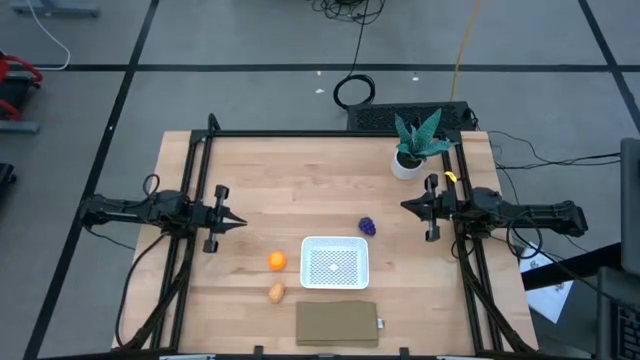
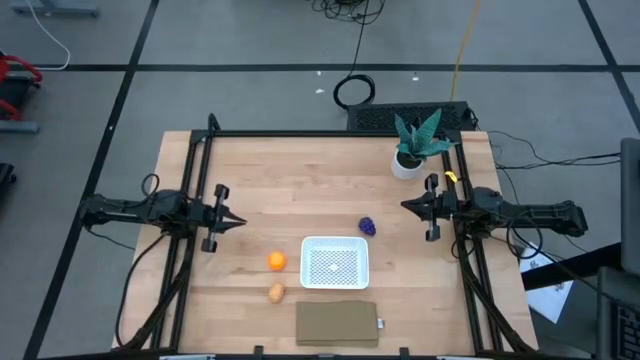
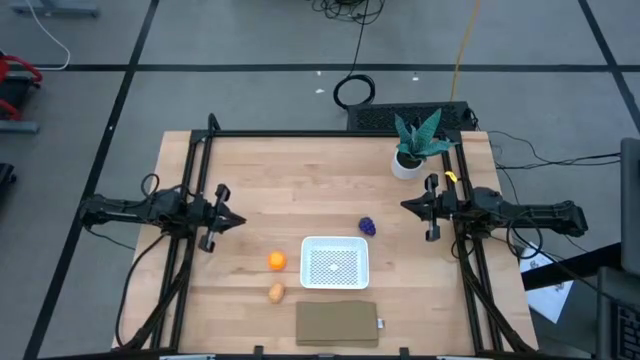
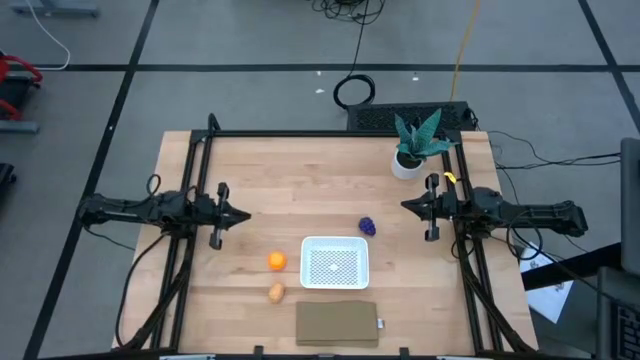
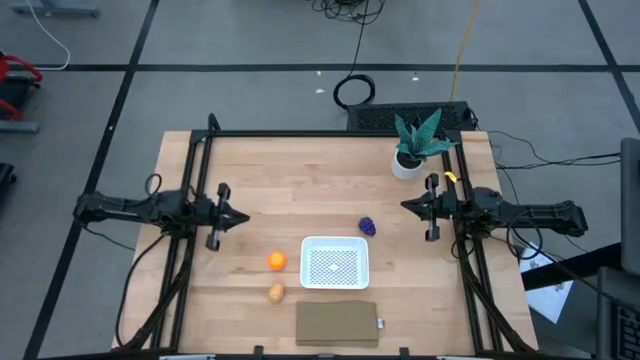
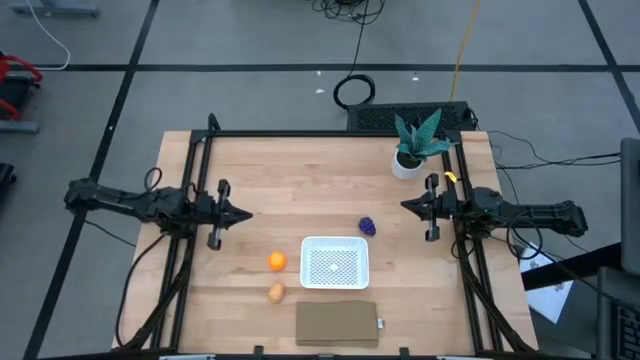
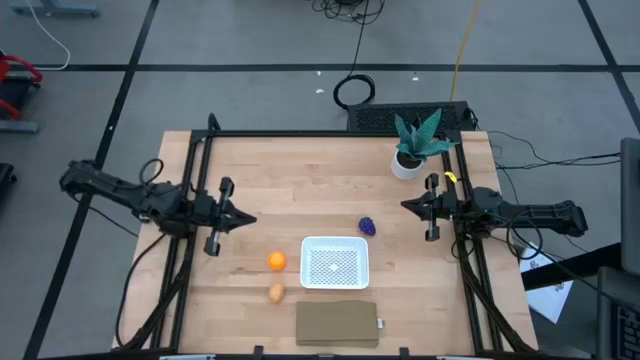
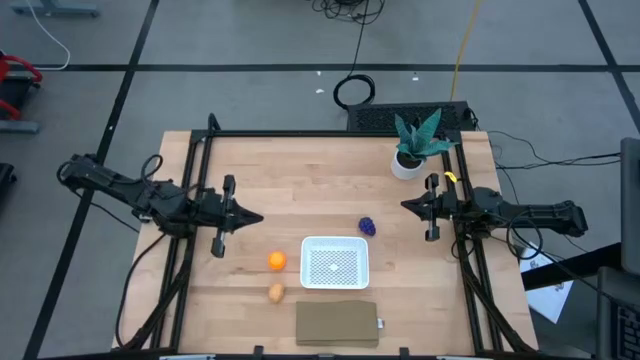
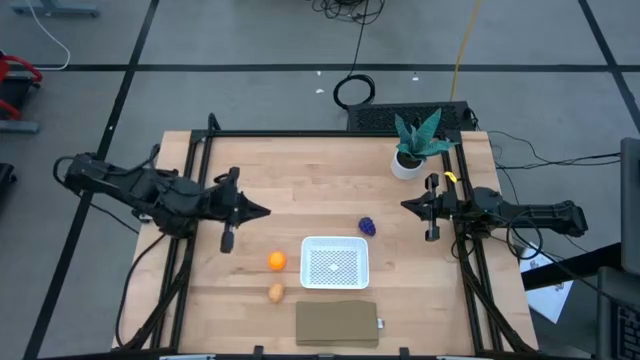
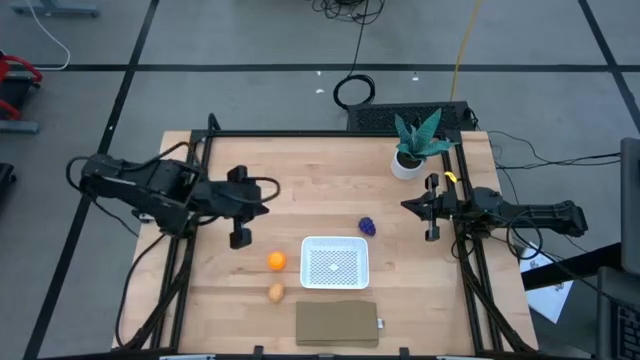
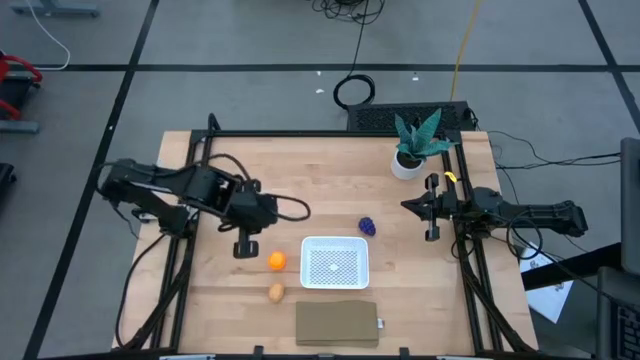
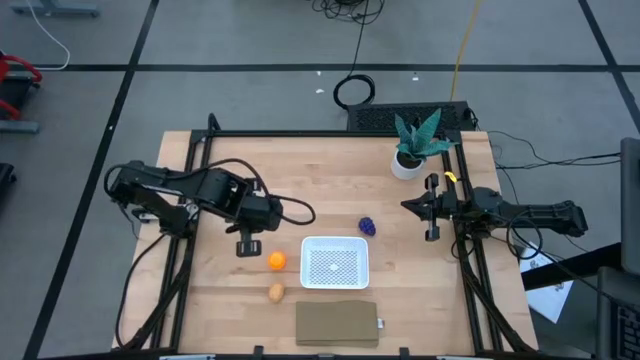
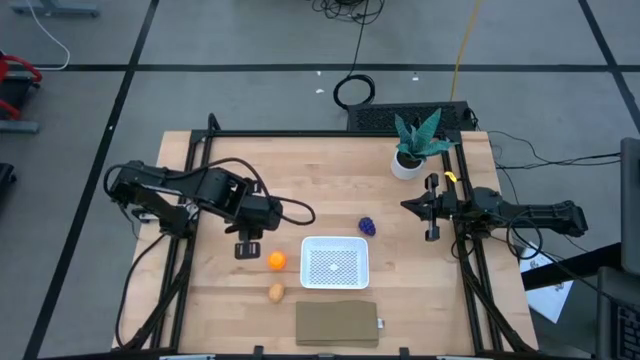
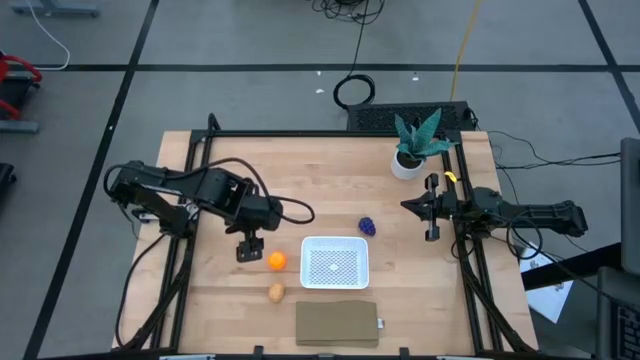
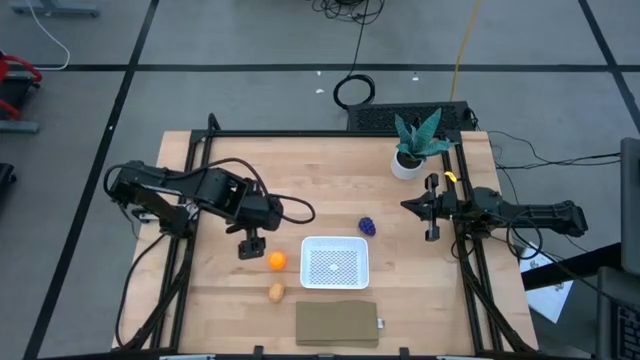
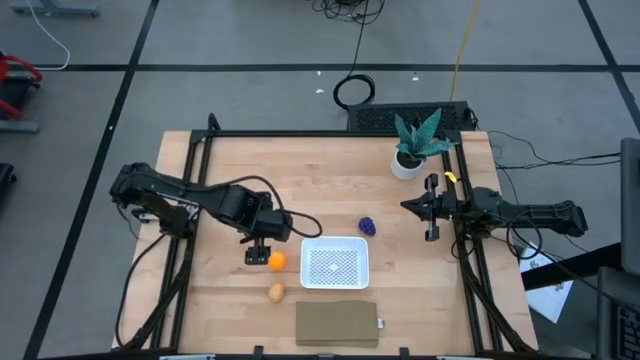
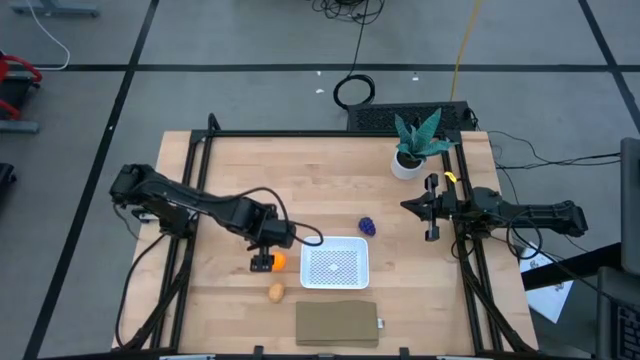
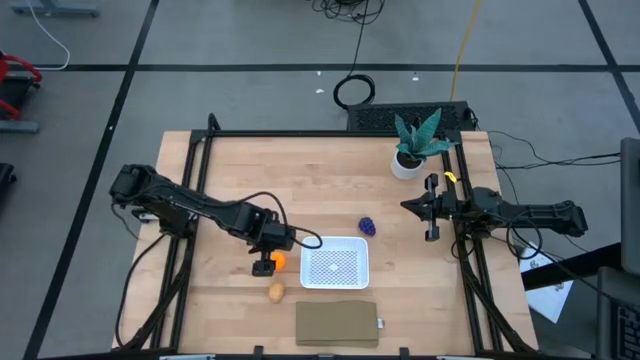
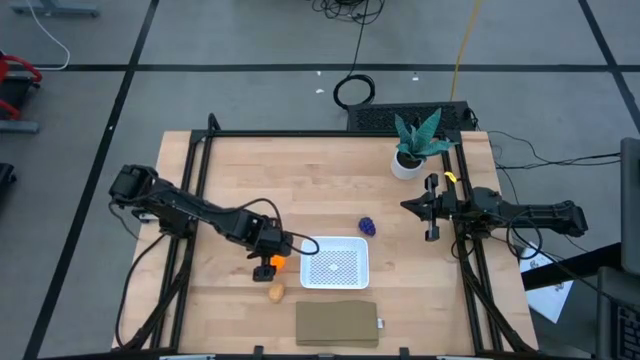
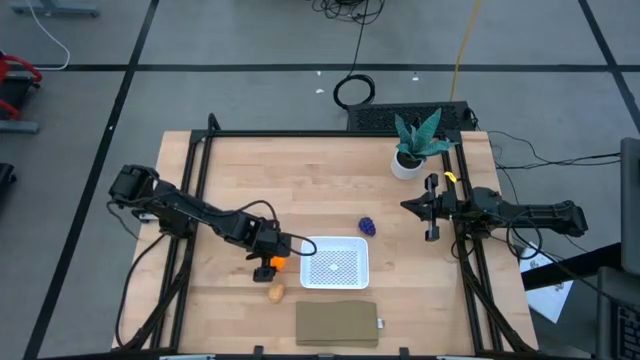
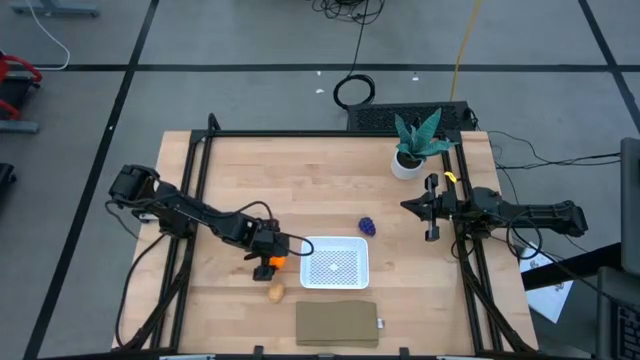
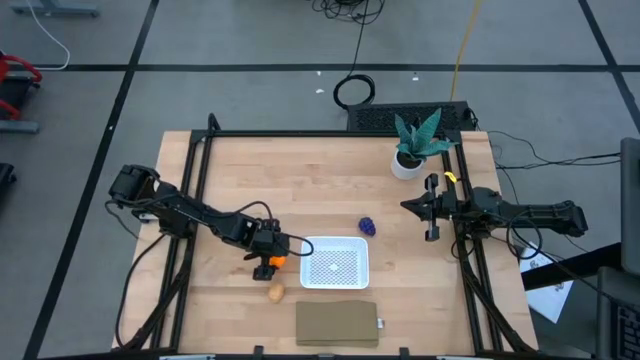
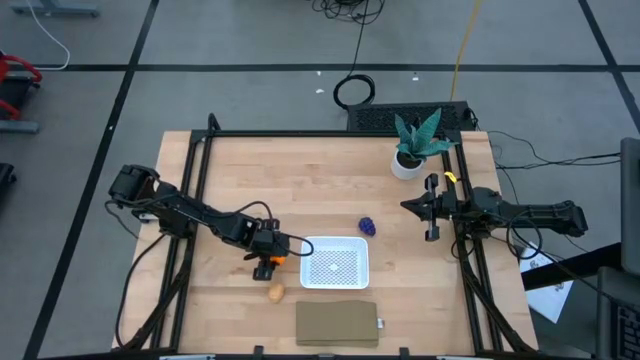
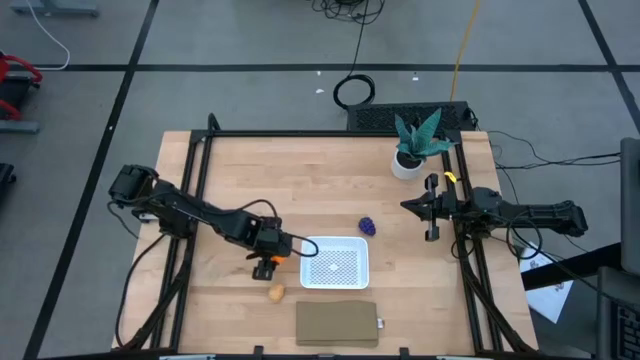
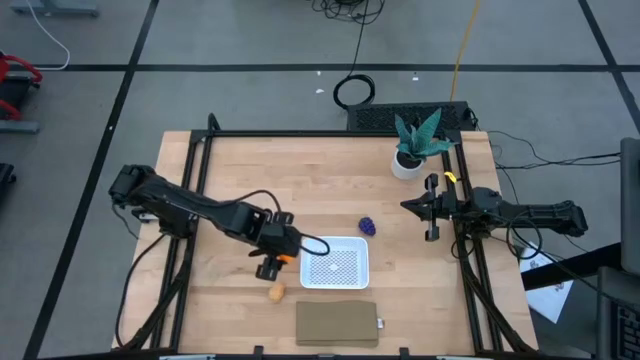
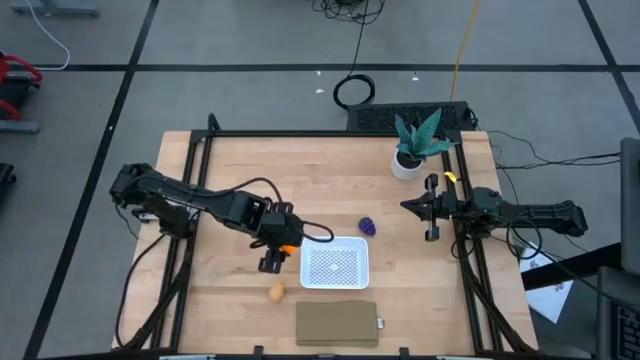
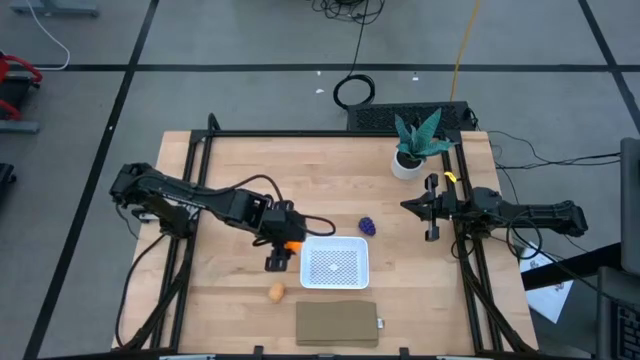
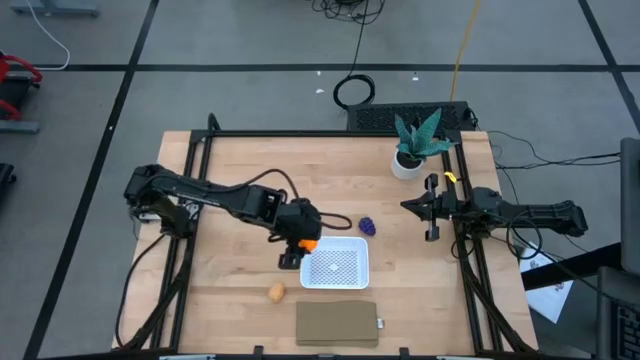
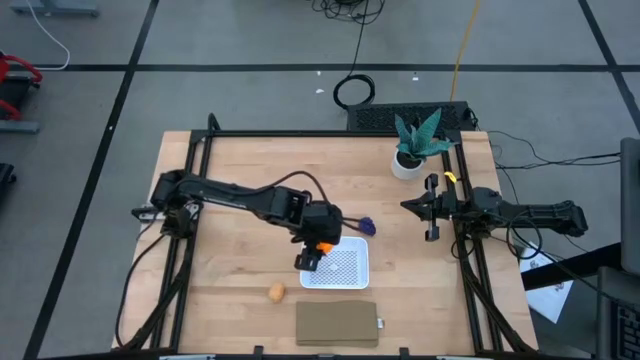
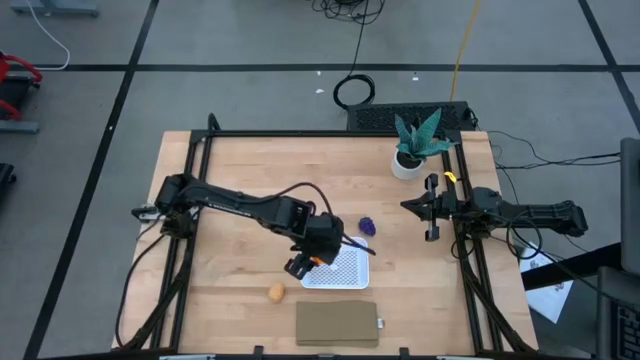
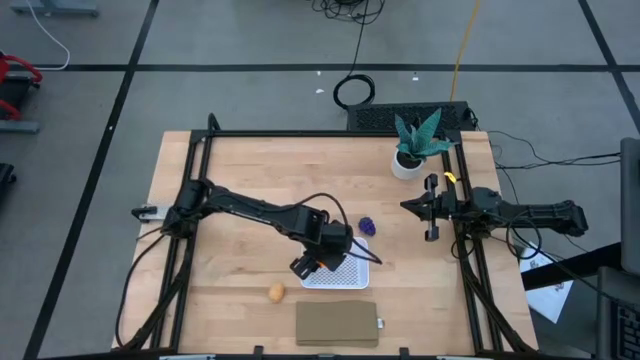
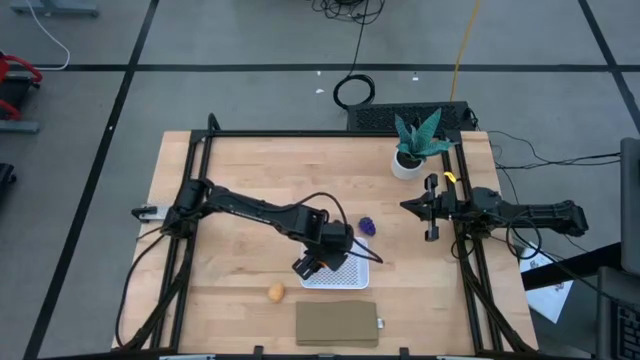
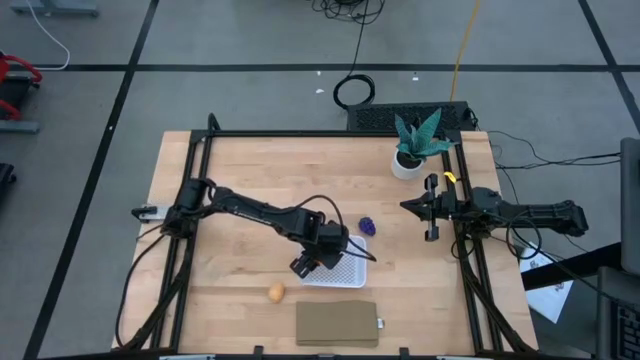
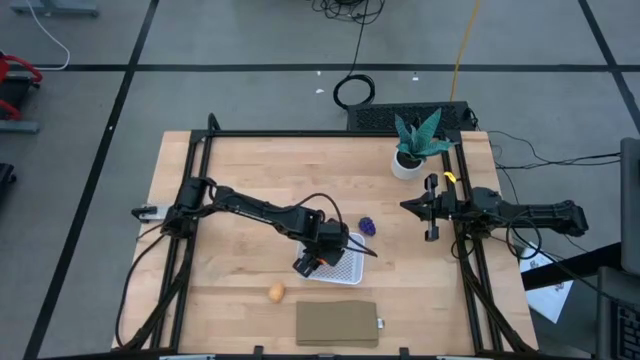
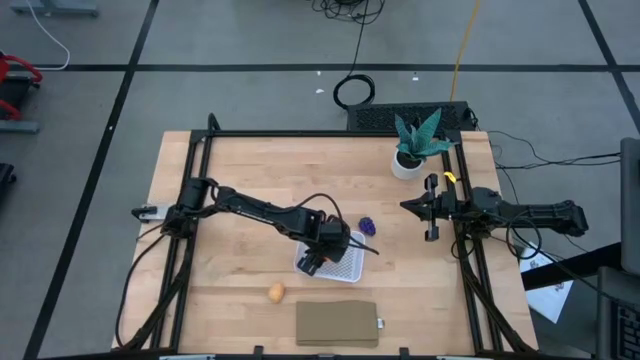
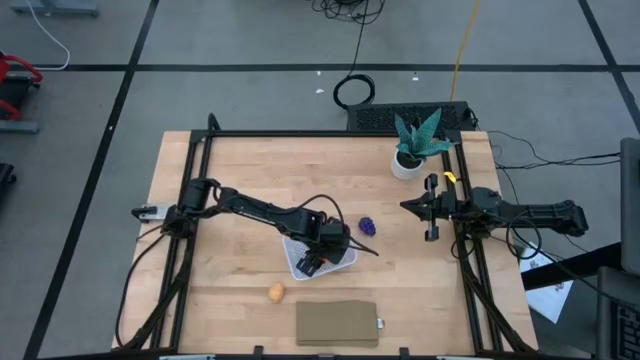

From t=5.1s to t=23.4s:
Task: Pick and placing Produce into tupperware
Put the orange into the basket

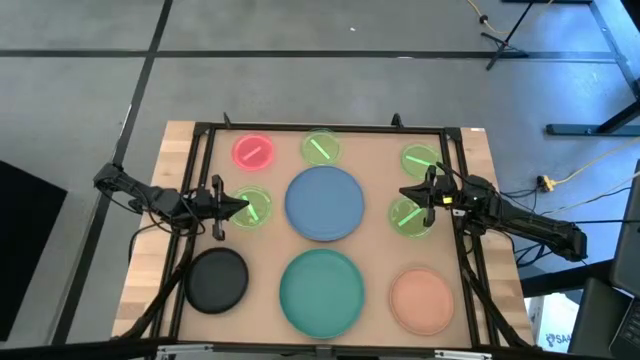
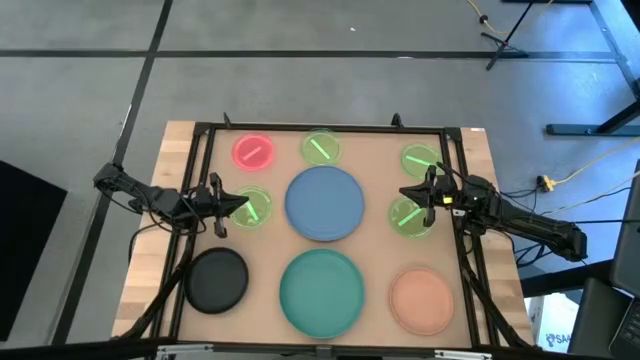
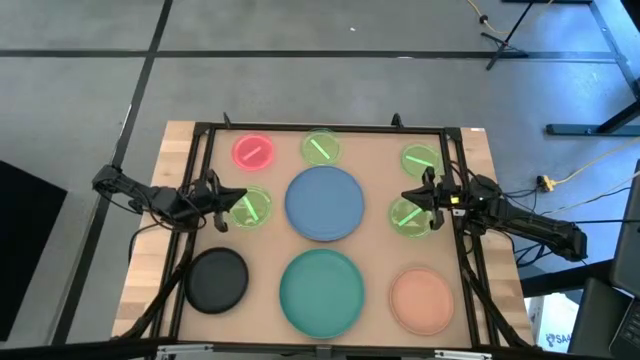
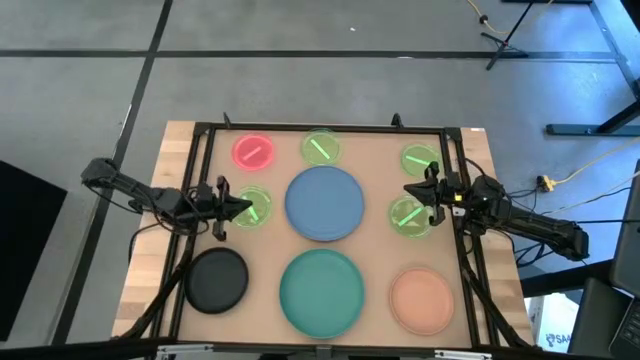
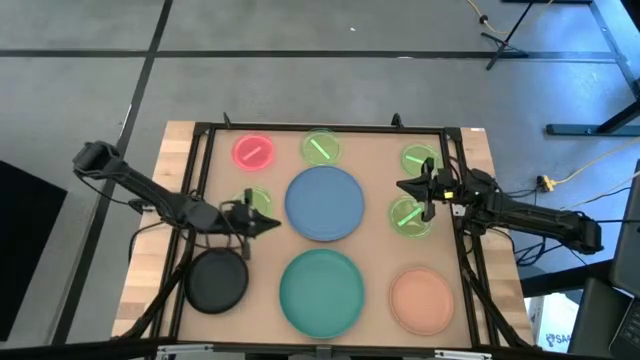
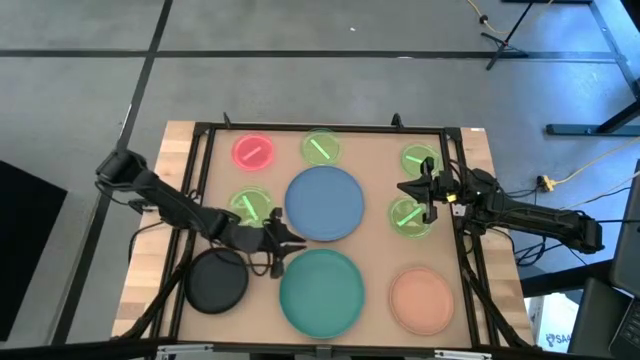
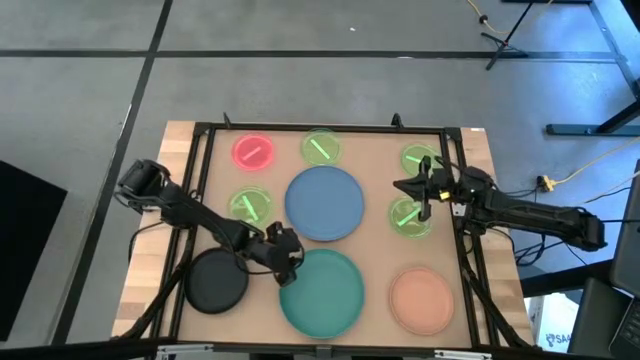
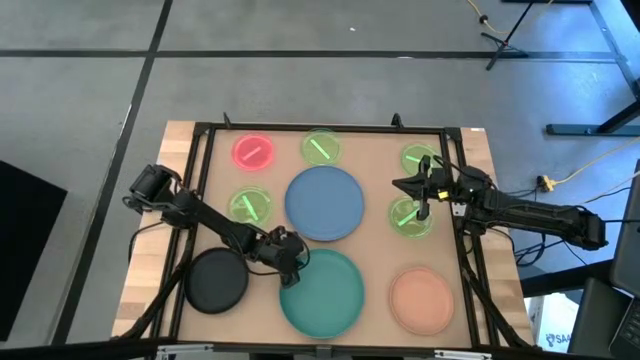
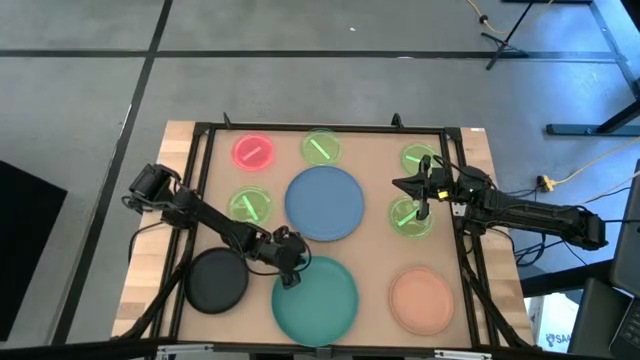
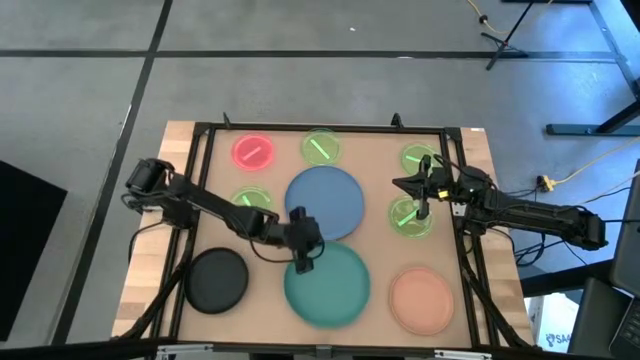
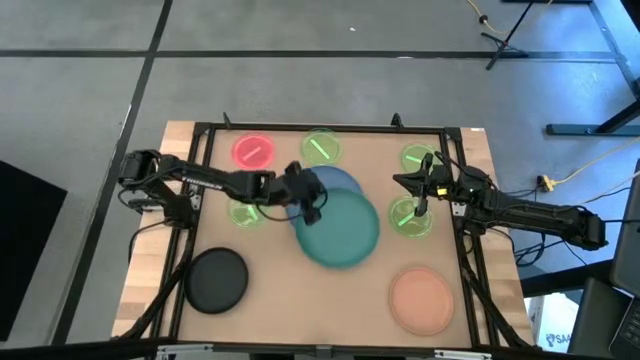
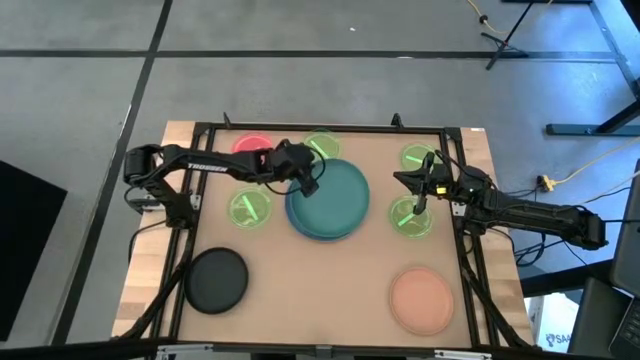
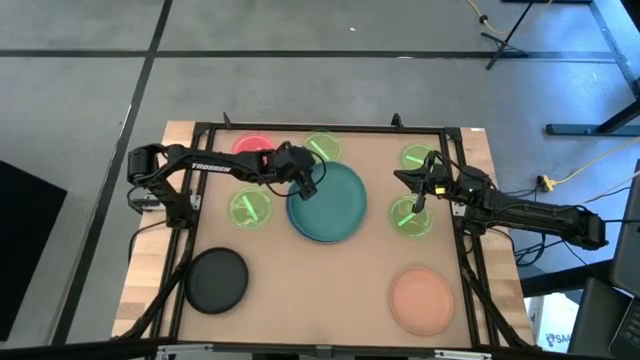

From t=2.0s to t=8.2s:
Task: Stack plastic plates
Stack the green plate on top of the blue plate
